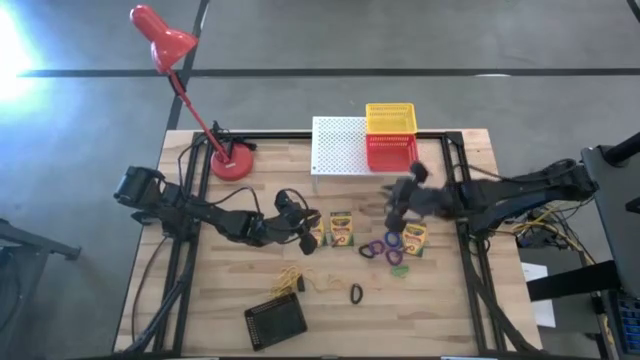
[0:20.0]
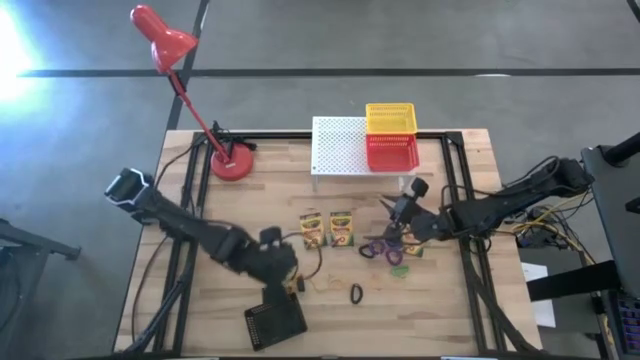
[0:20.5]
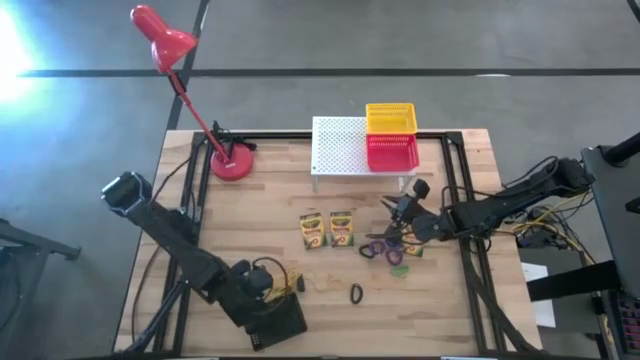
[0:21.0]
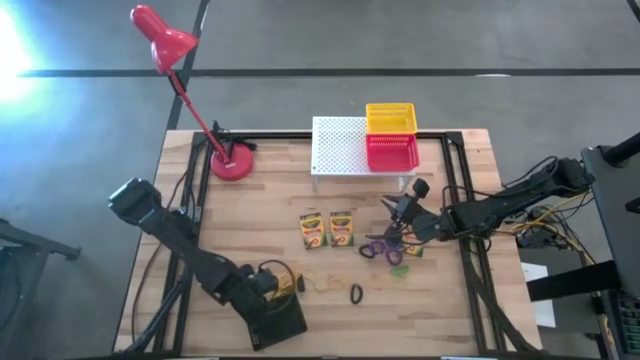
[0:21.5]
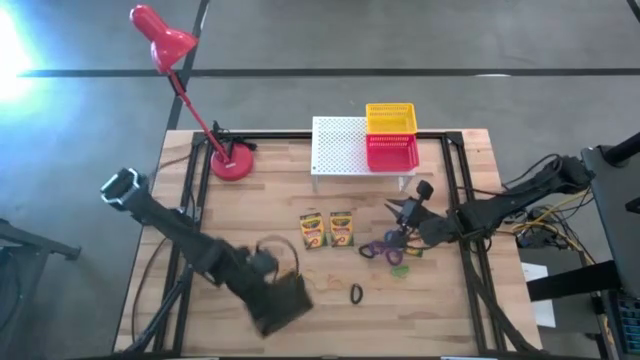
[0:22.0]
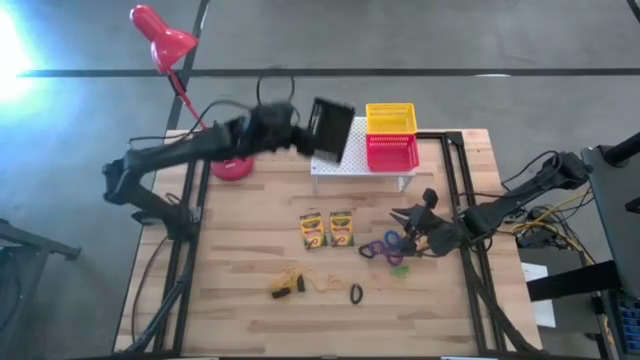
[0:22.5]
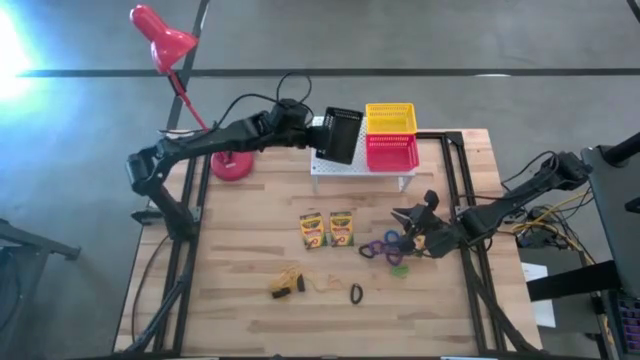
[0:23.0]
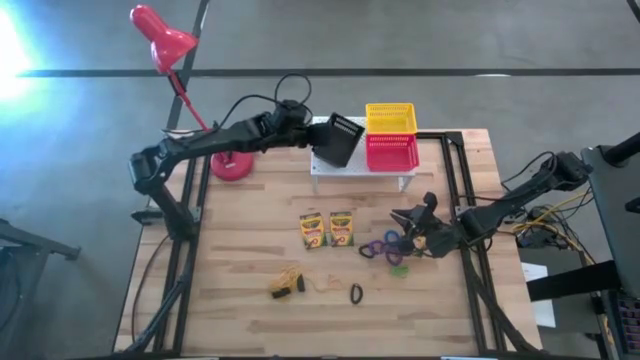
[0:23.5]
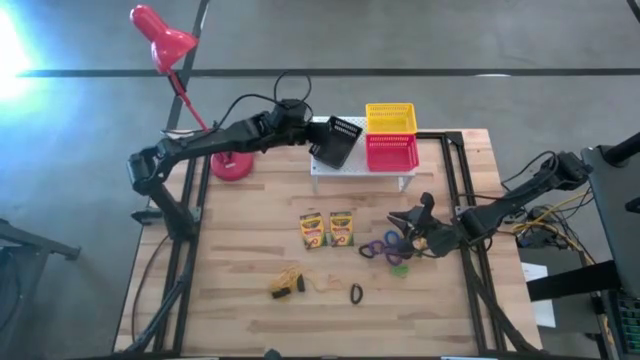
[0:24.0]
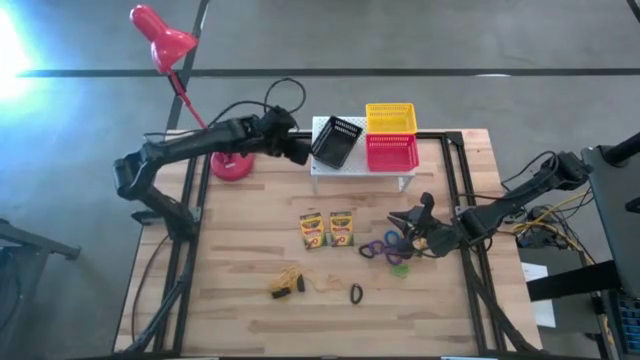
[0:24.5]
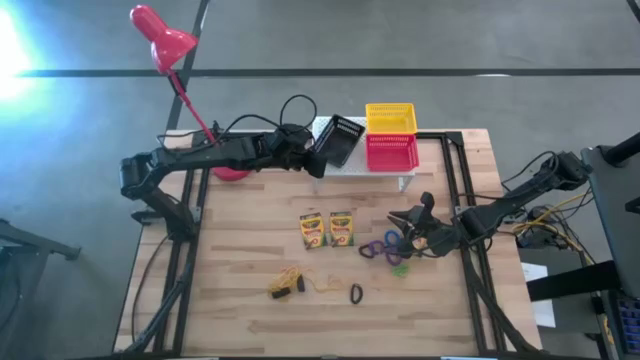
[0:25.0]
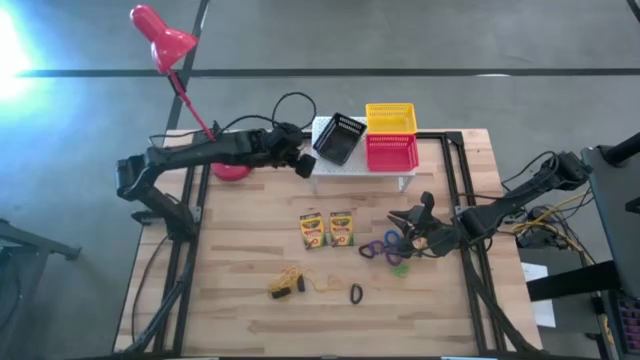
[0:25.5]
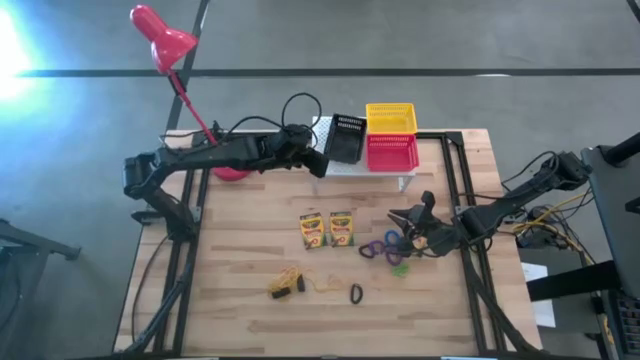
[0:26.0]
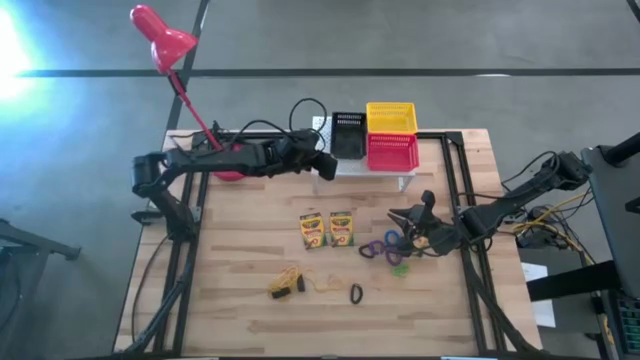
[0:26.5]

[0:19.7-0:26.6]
Task: Pick & Place Office Desk Supplies
Put the black basket on the shelf

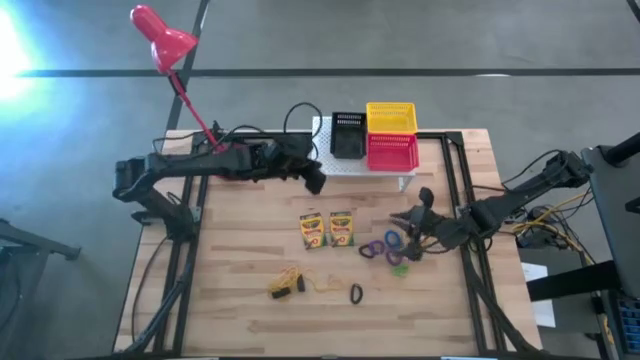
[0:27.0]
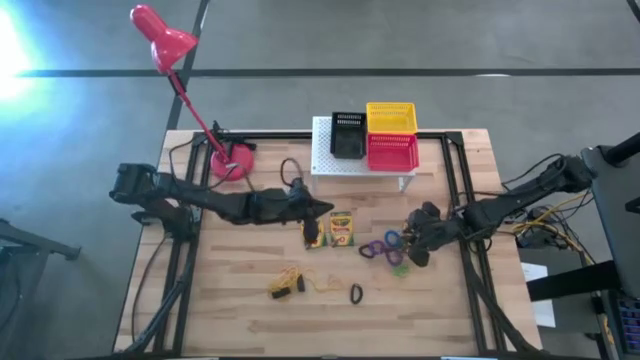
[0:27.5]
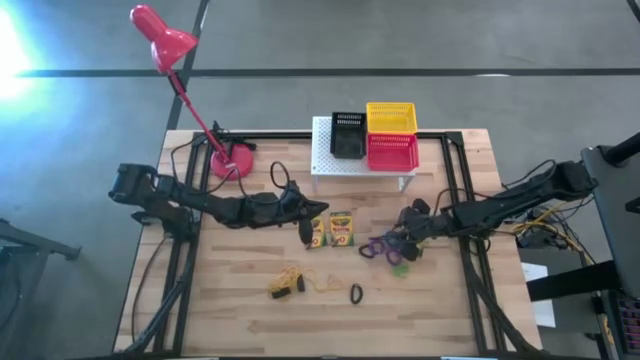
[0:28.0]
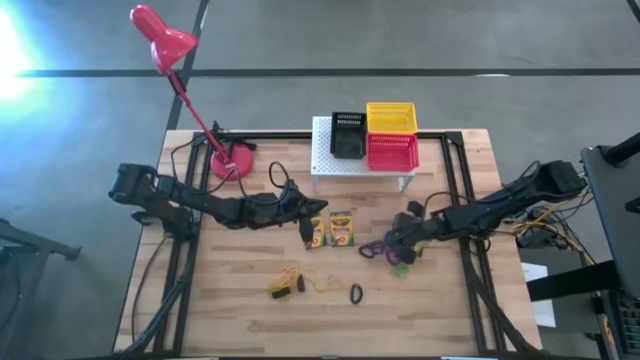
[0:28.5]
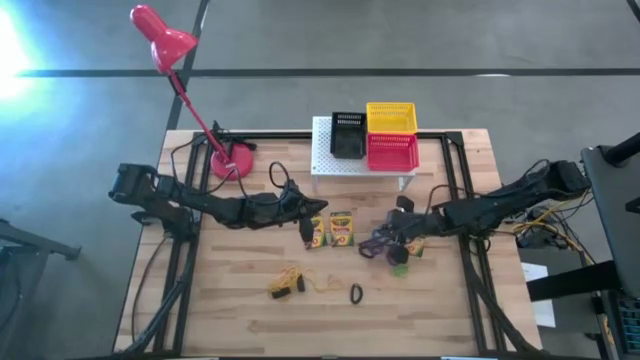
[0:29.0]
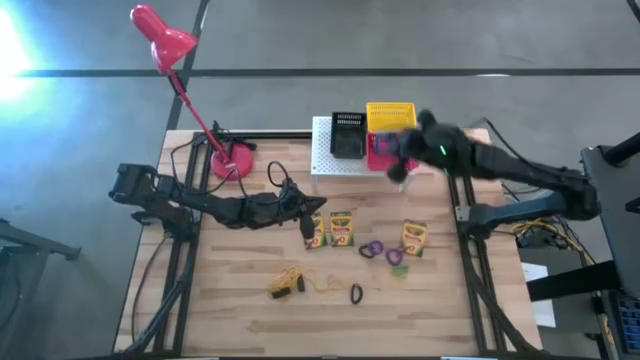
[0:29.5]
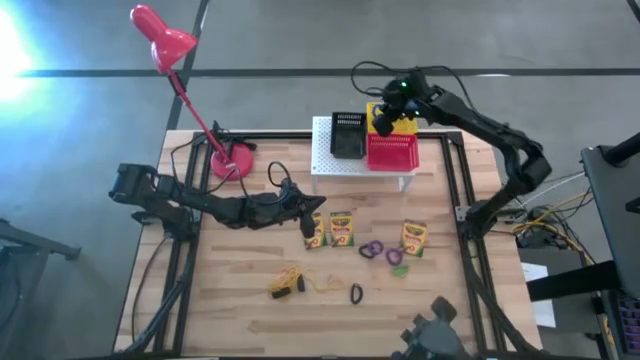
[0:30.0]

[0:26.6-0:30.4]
Put the blue spring keychain into the yellow basket on the shelf

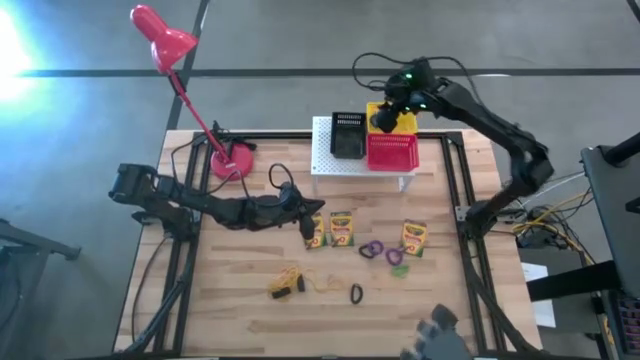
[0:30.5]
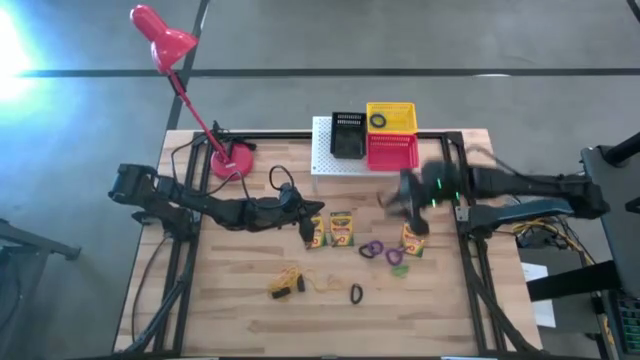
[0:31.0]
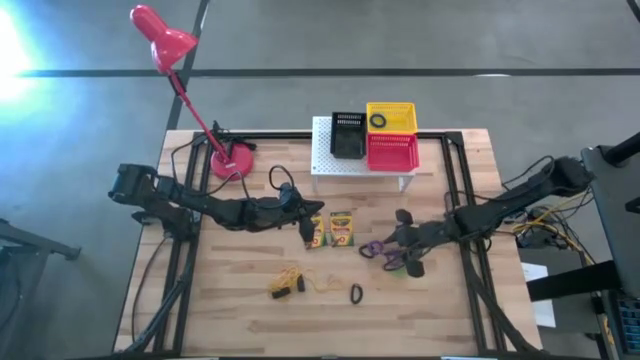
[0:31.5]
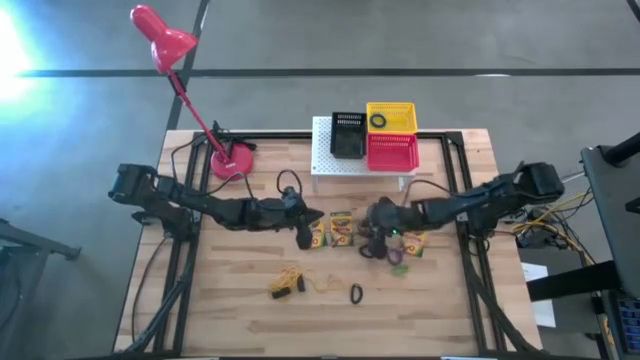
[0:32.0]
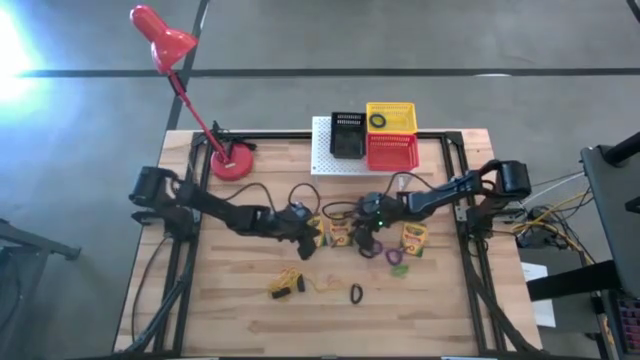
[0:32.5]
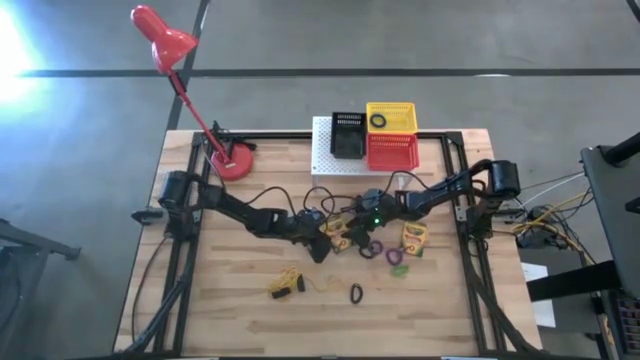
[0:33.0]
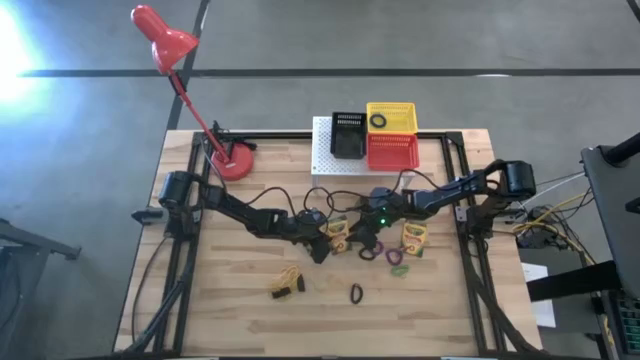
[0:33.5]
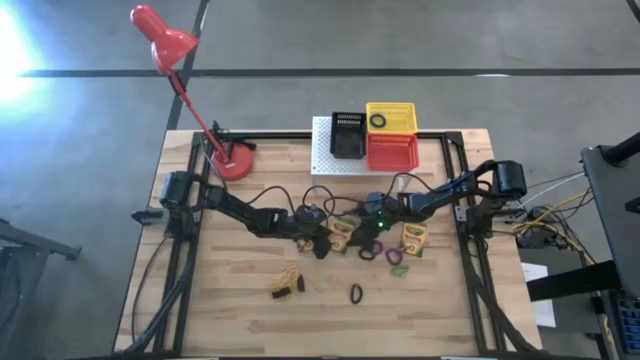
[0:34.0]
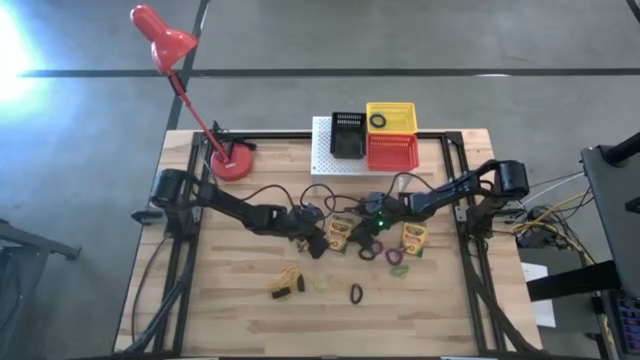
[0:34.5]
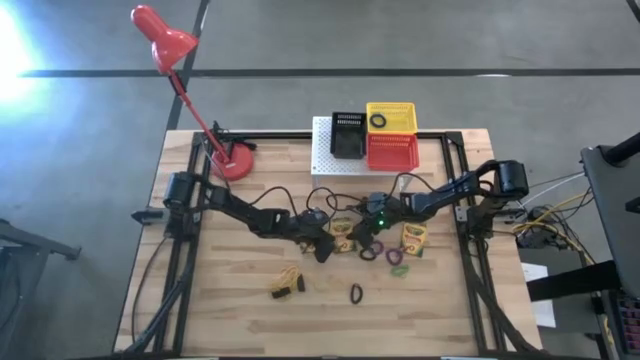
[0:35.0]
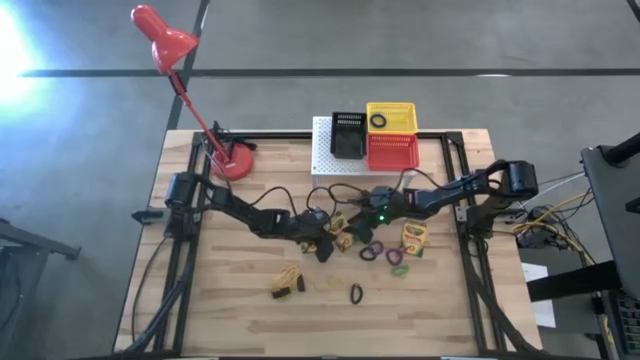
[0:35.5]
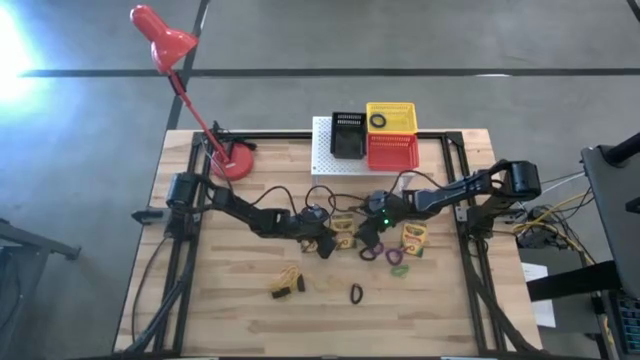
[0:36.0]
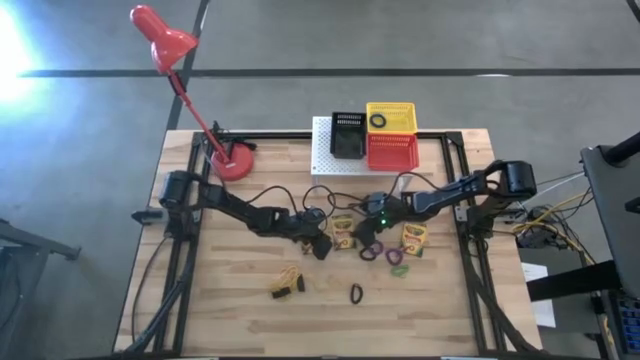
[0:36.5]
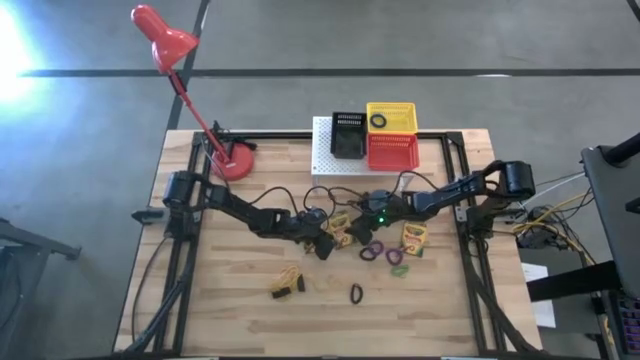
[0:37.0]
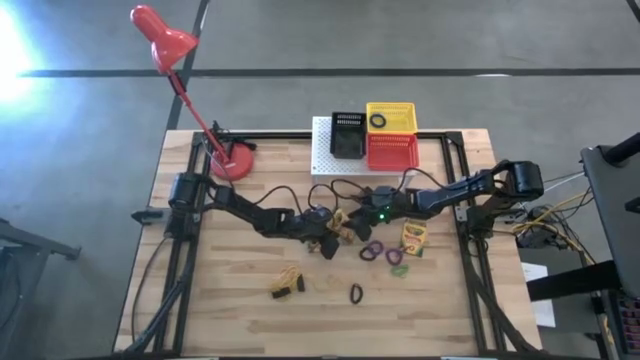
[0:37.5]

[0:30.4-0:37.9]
Put the top middle crayon box into the black basket on the shelf
